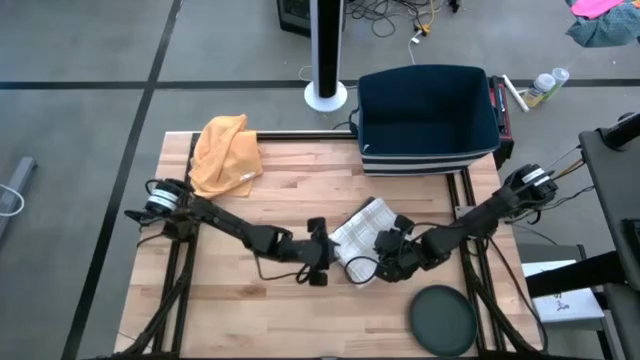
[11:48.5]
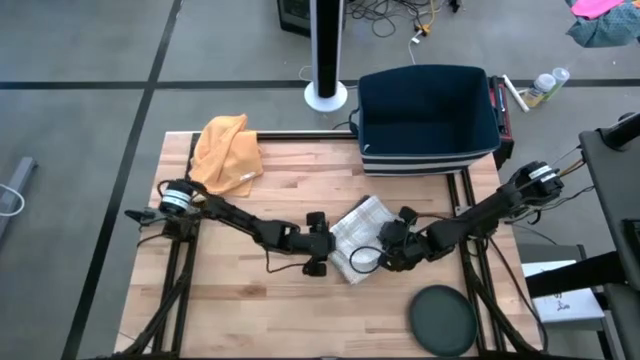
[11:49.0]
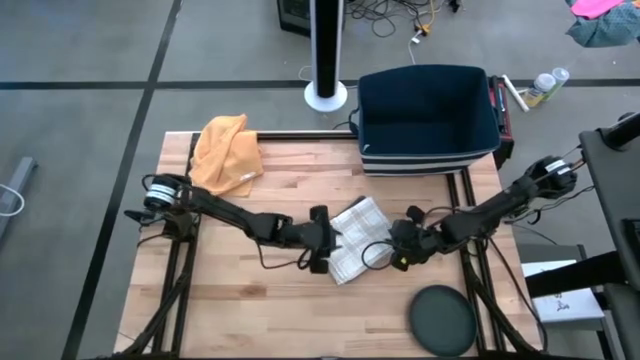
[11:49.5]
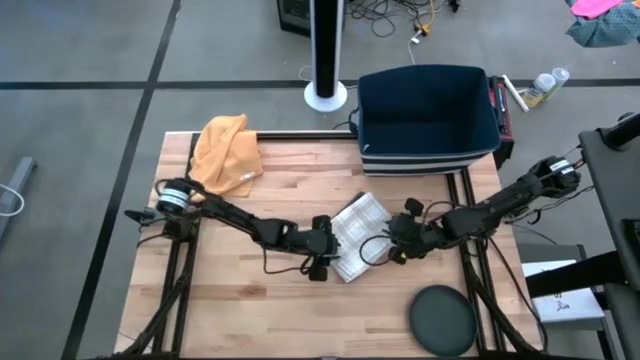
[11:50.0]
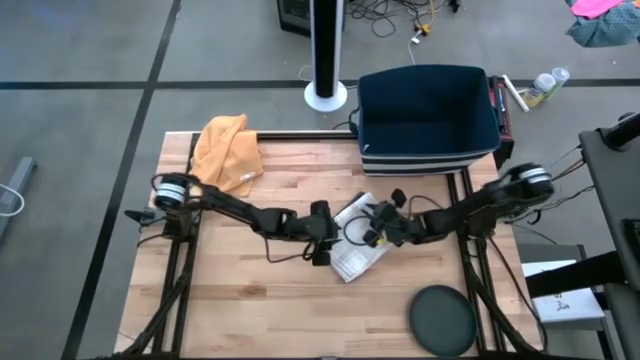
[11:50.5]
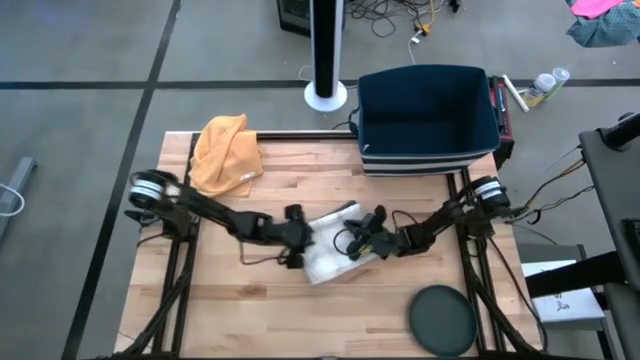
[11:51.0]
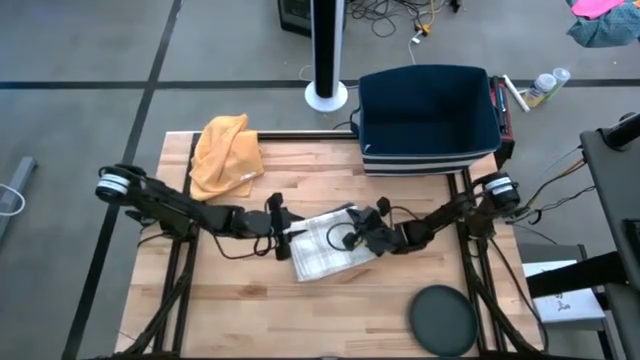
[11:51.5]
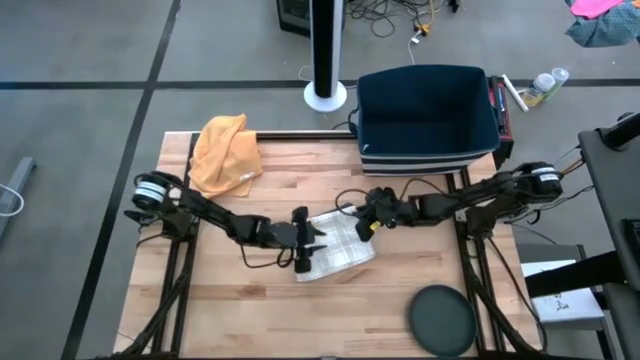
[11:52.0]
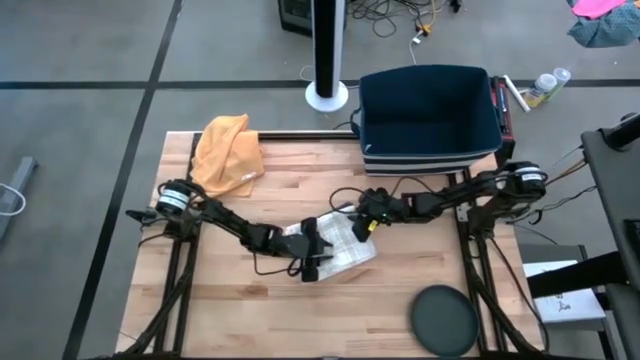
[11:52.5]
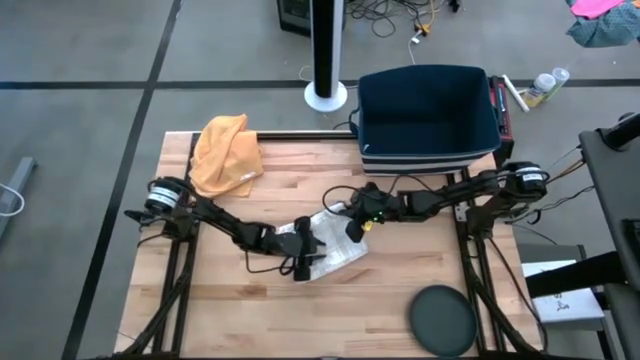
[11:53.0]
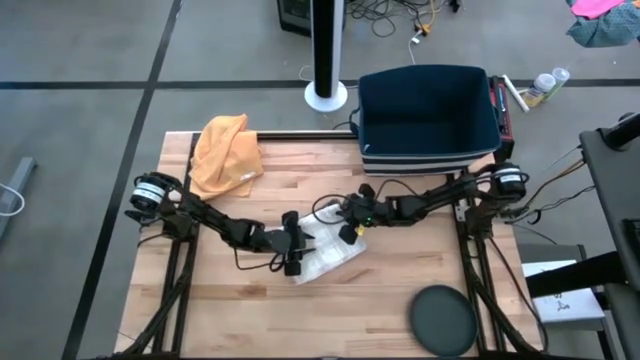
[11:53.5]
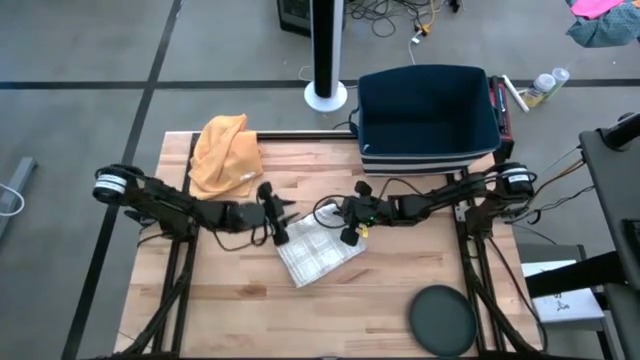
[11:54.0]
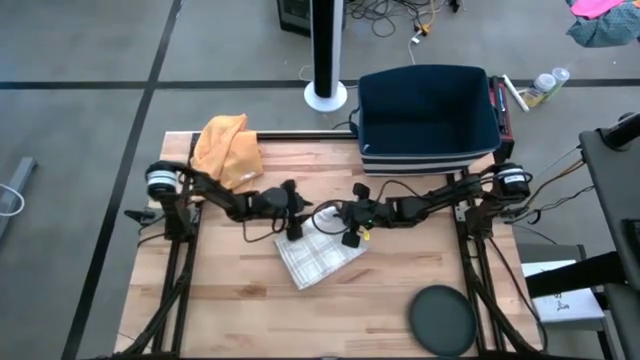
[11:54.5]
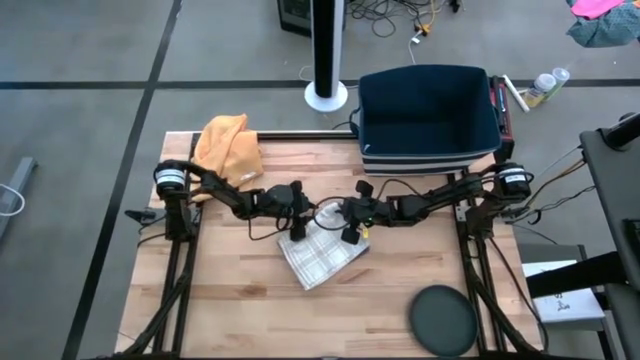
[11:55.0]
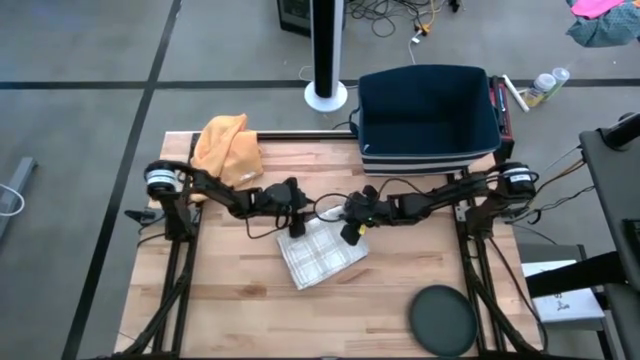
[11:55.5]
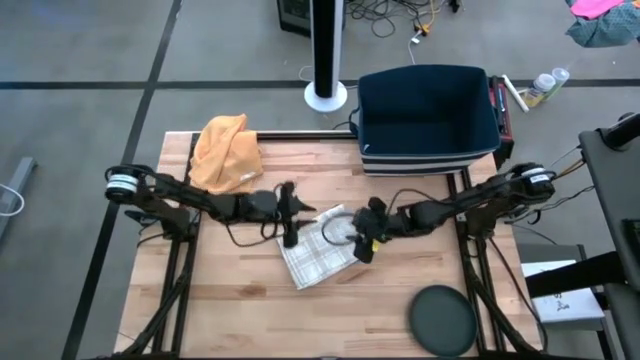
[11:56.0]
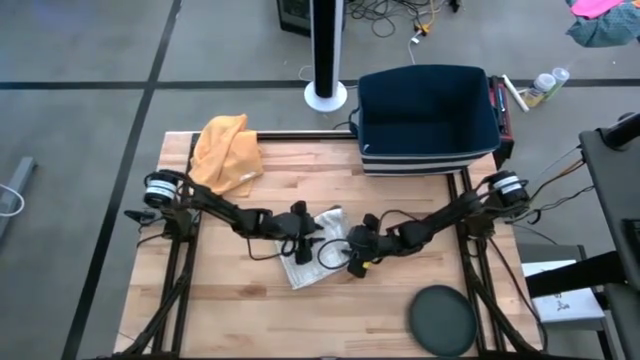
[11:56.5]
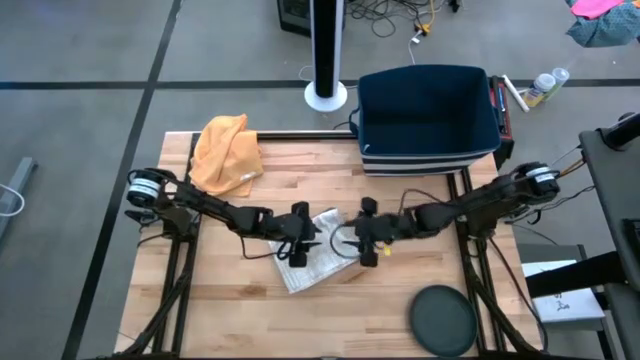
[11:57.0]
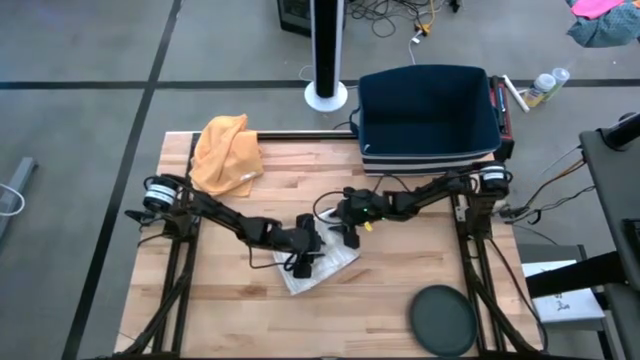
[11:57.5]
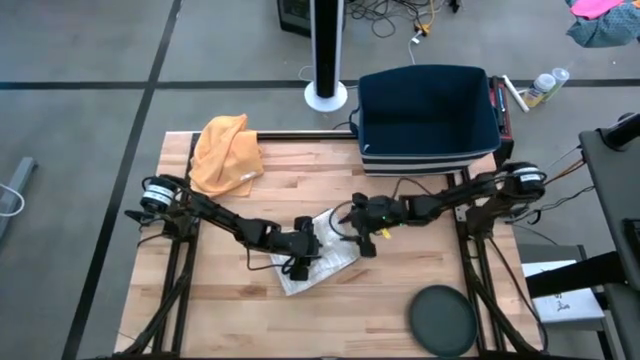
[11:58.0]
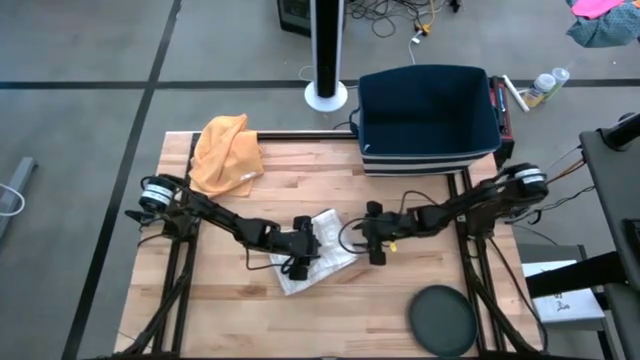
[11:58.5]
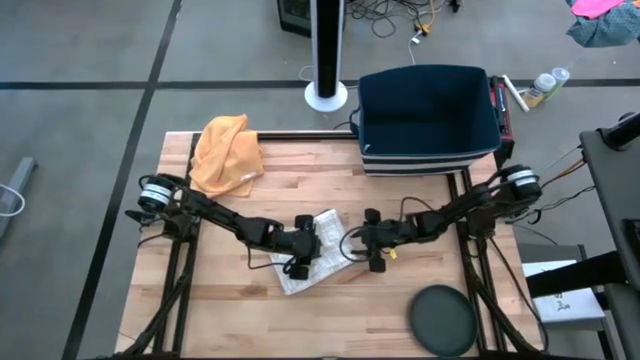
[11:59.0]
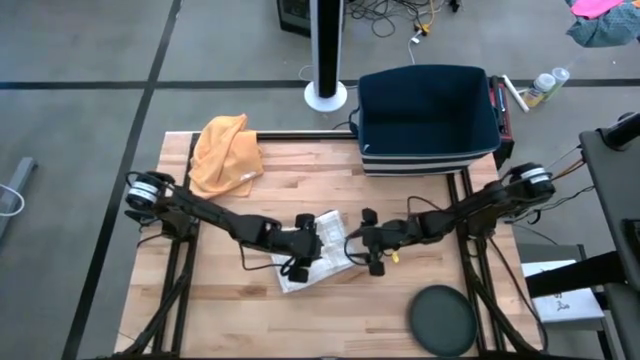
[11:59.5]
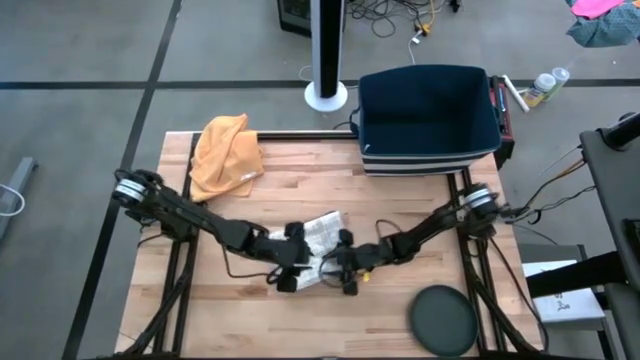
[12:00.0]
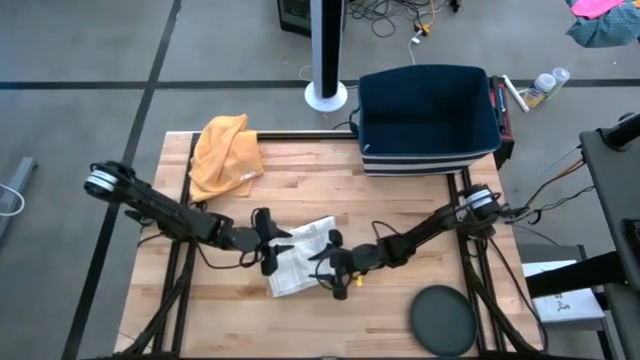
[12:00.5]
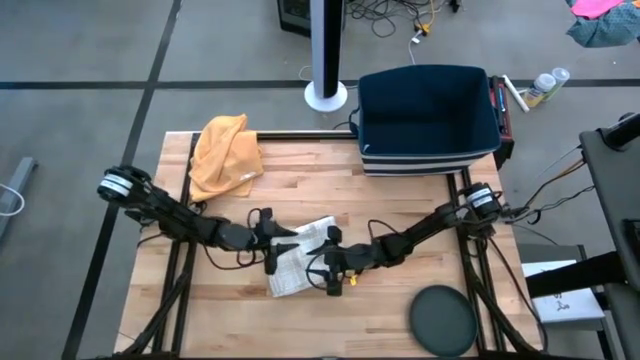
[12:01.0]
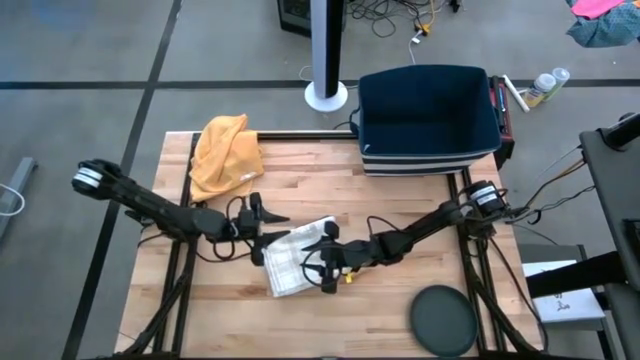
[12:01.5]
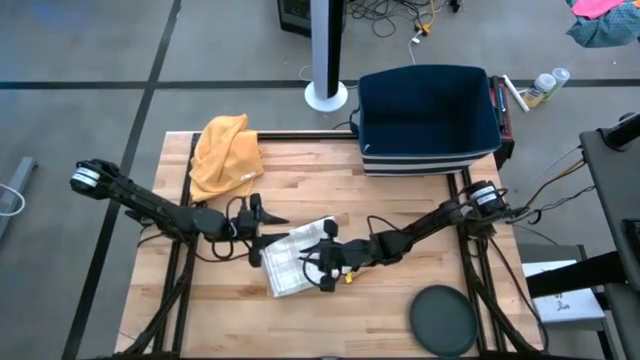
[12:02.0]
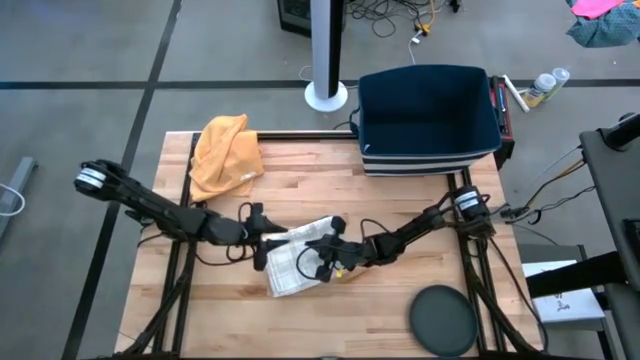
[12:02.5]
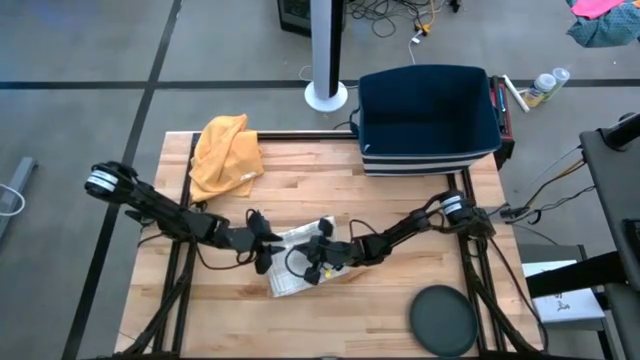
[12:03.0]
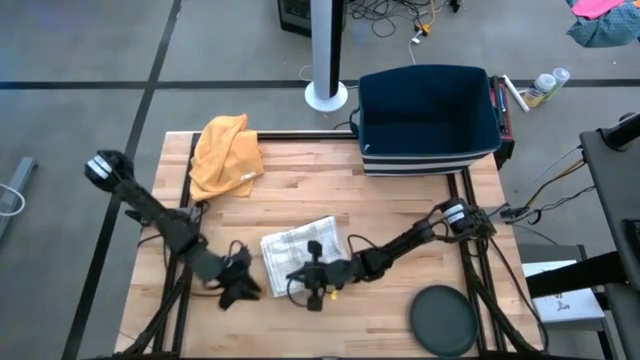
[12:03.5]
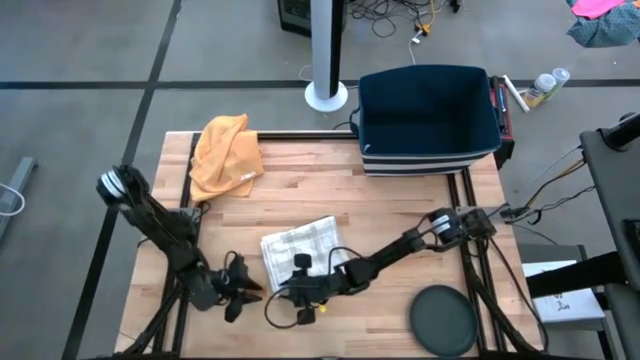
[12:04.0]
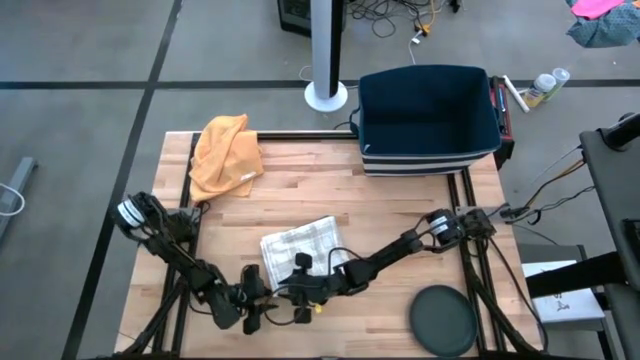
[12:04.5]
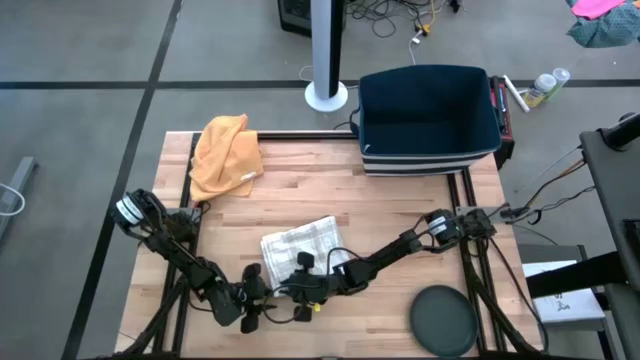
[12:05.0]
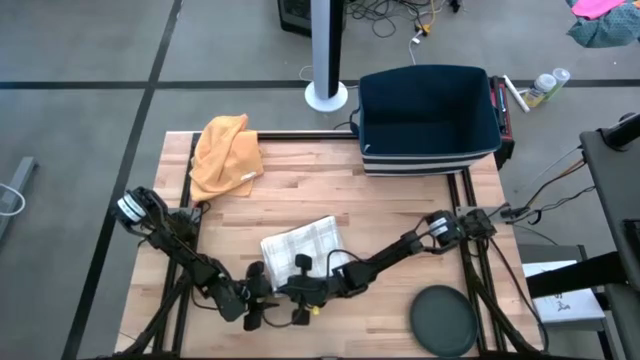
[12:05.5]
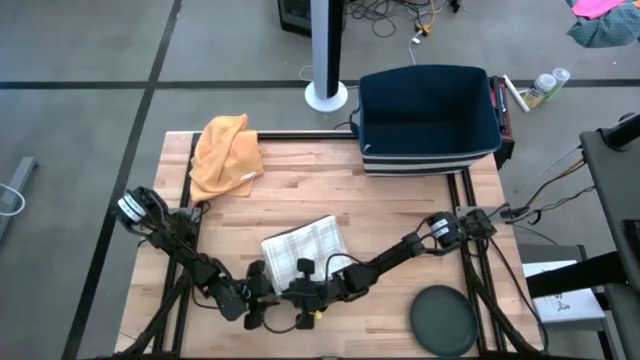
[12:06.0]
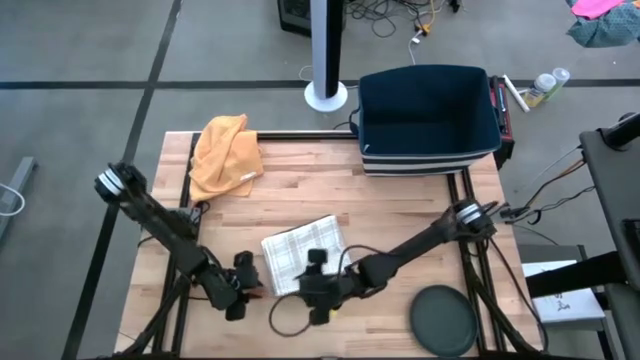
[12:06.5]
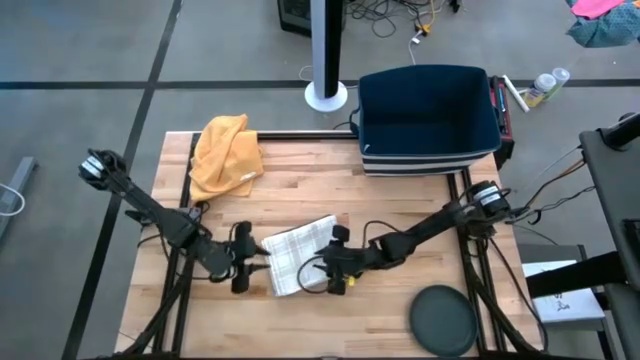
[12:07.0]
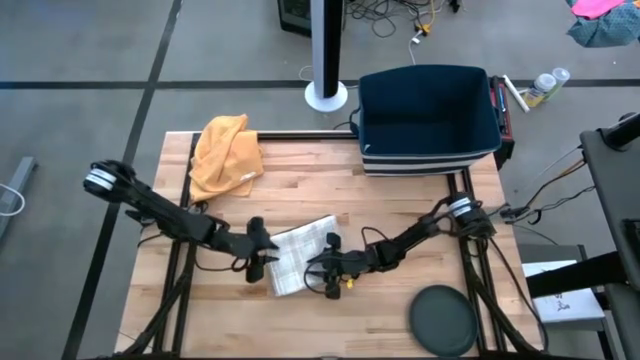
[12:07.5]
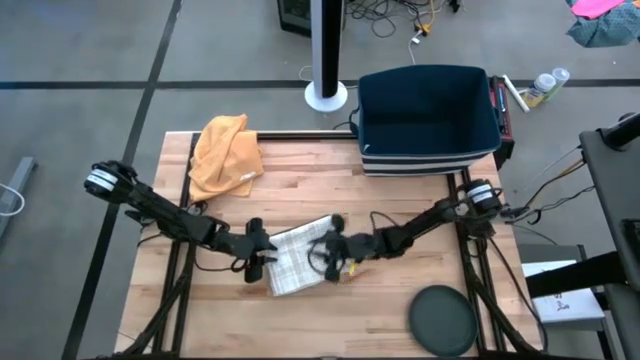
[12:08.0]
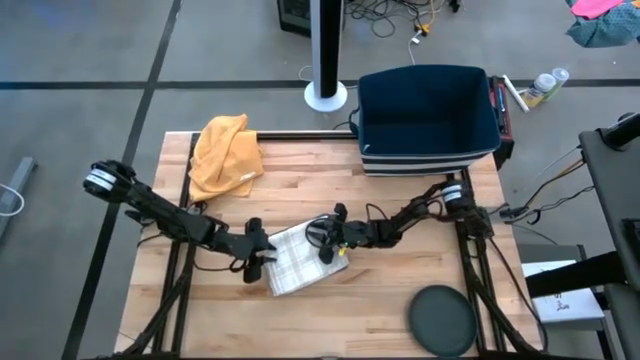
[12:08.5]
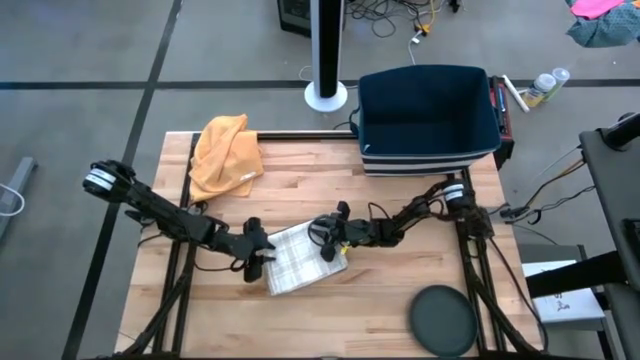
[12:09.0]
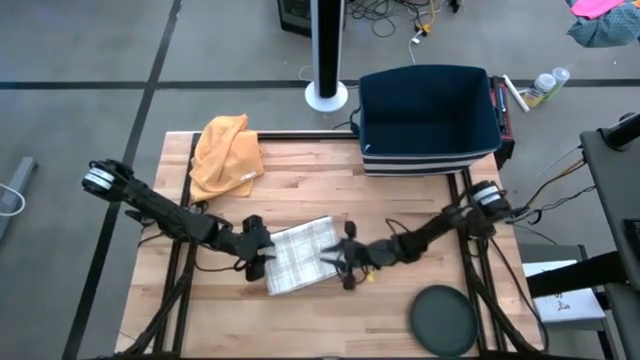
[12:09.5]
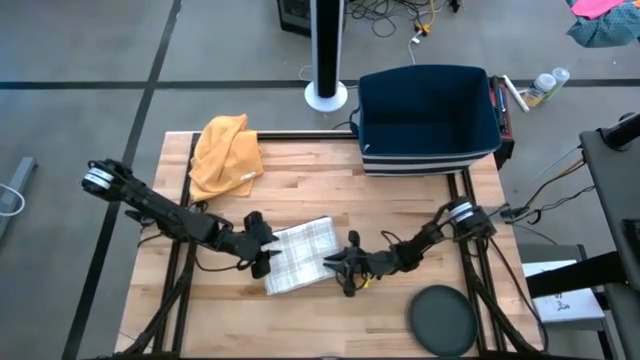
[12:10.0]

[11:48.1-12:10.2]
Task: Fold kitchen towel into neat rectangle
Stack the white patterned towel on top of the gray towel
